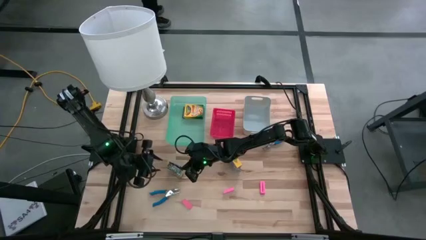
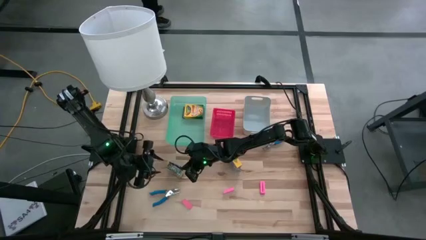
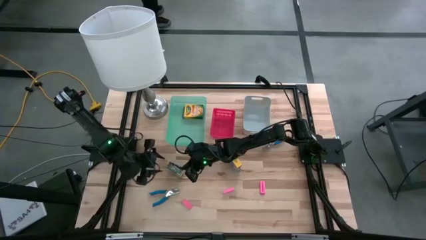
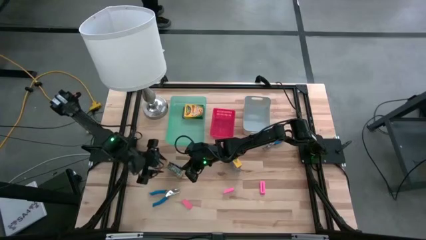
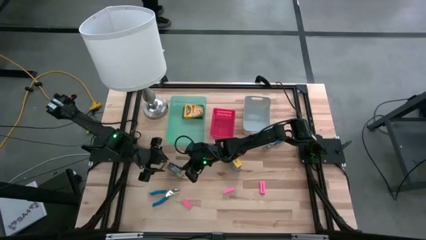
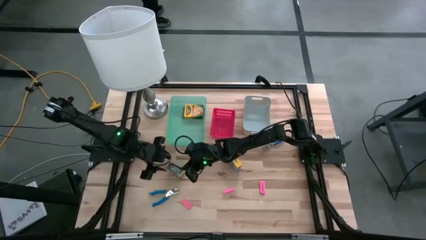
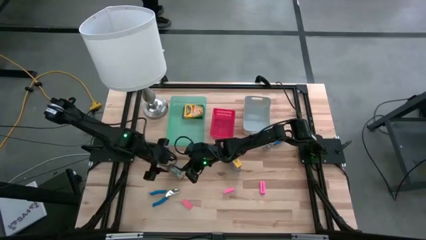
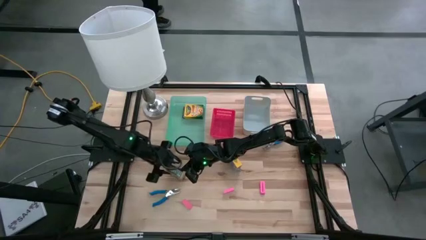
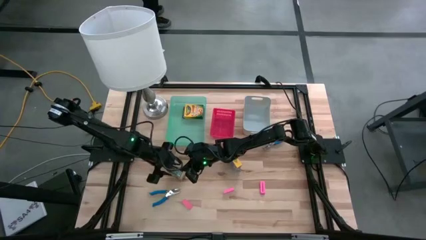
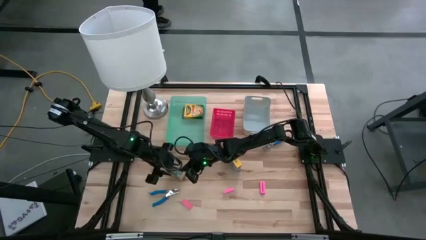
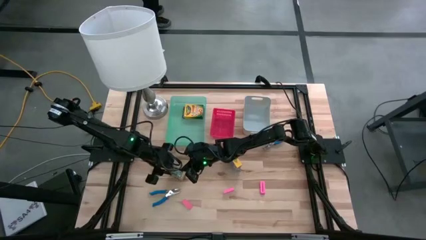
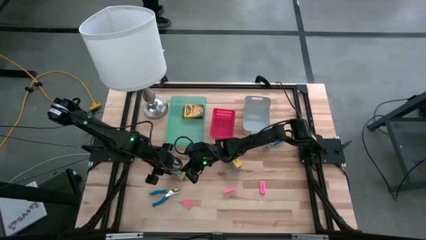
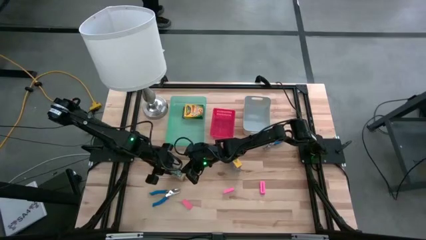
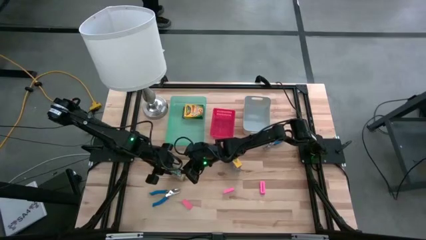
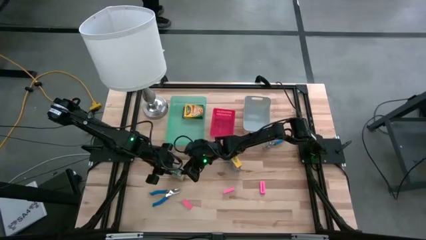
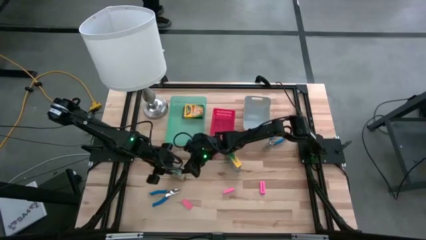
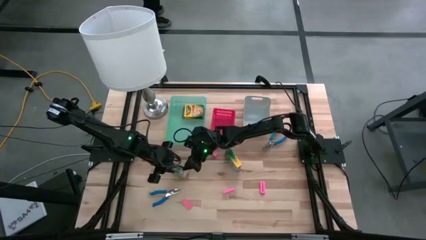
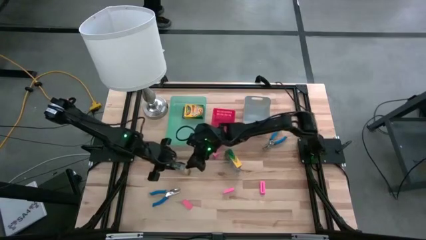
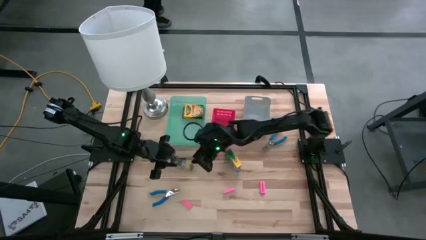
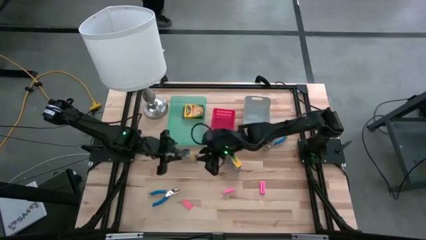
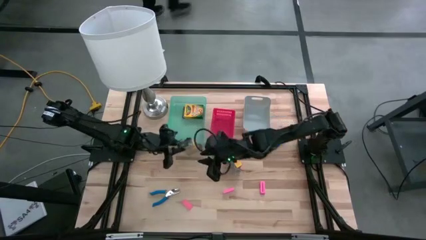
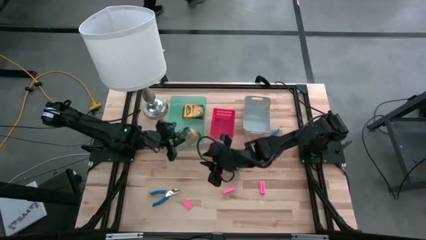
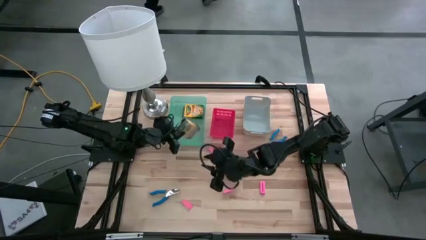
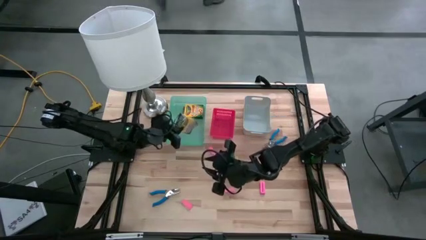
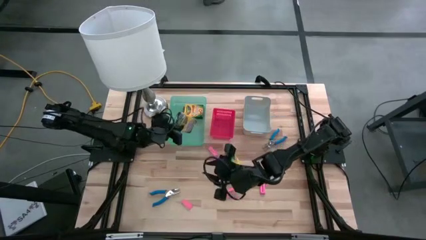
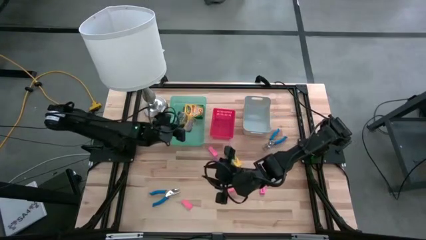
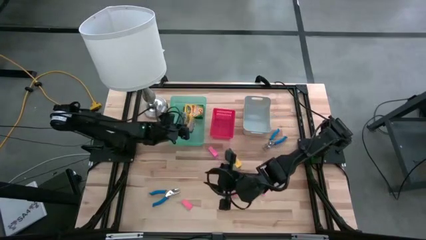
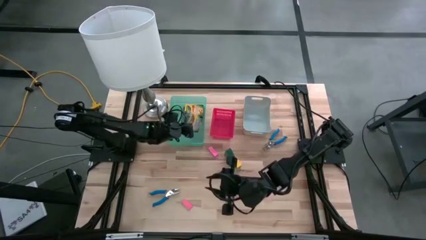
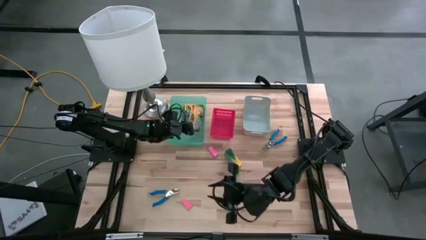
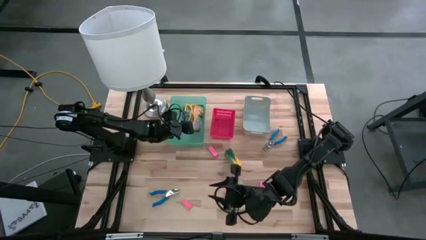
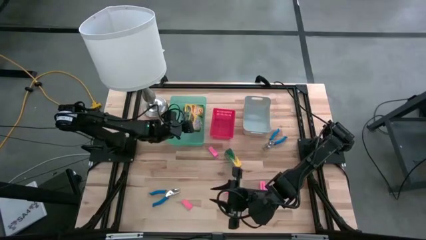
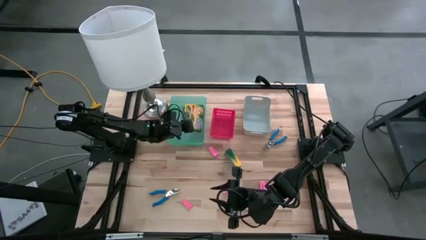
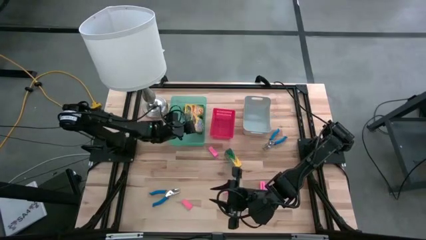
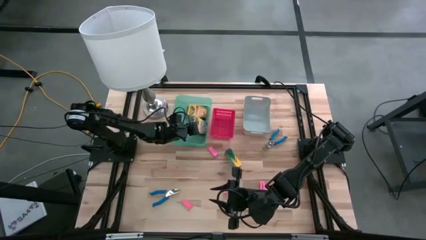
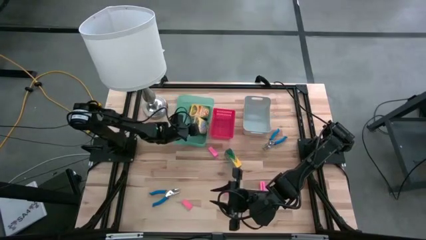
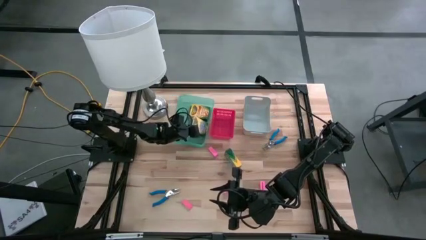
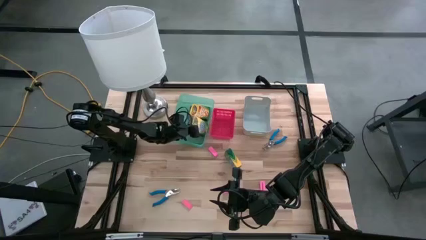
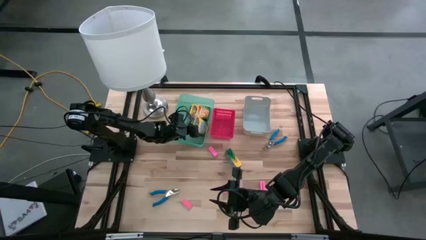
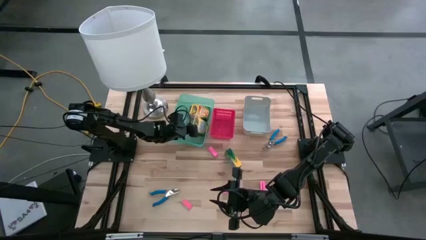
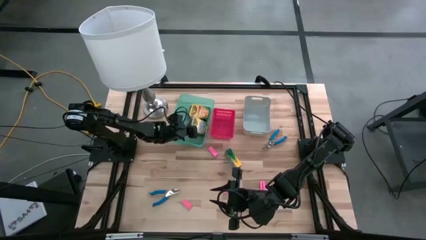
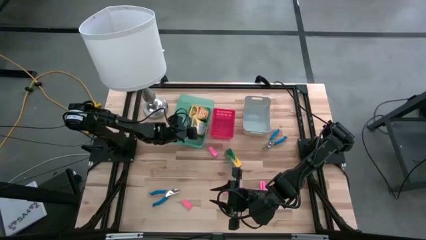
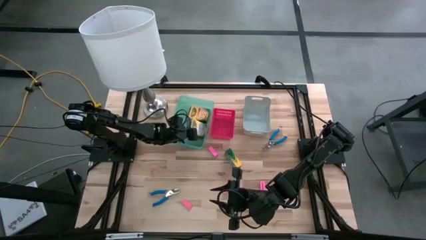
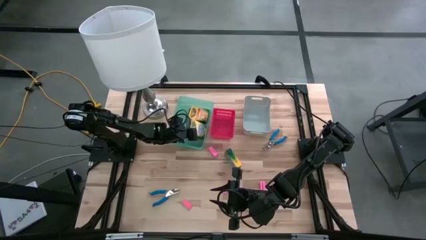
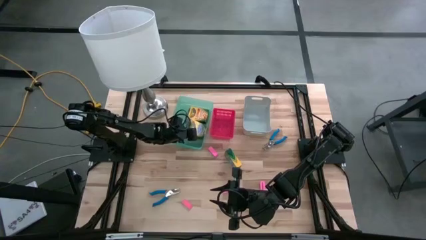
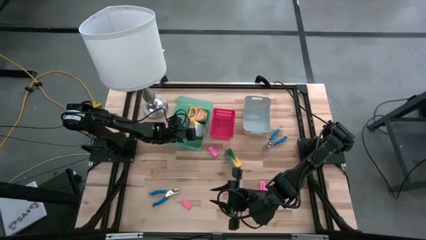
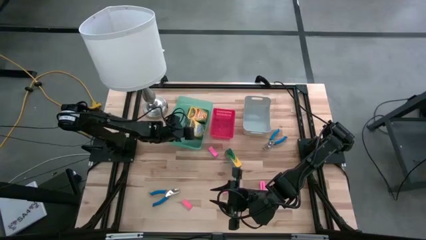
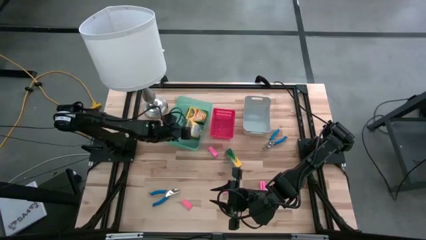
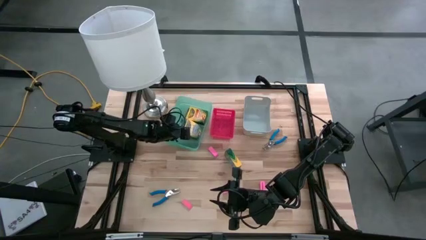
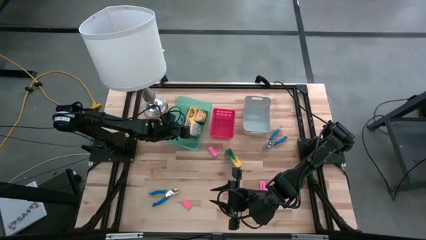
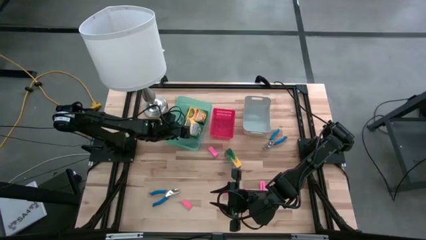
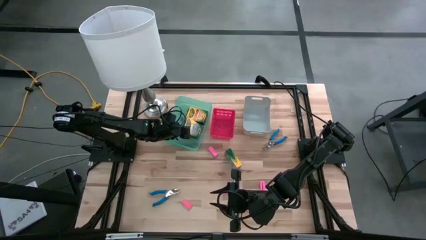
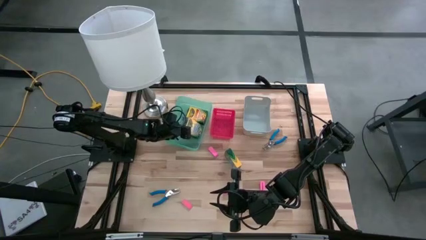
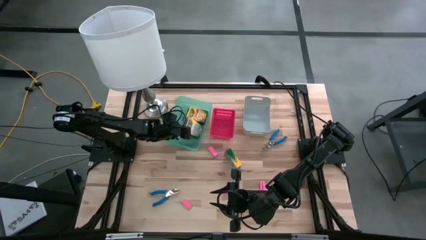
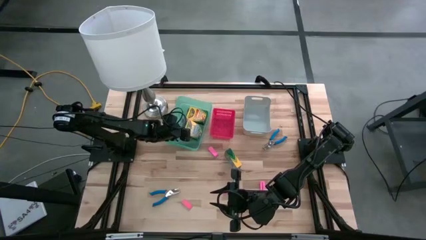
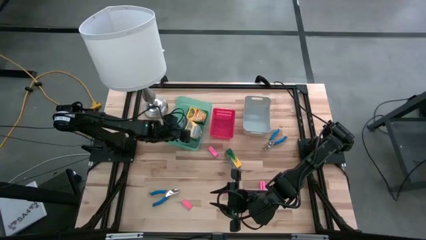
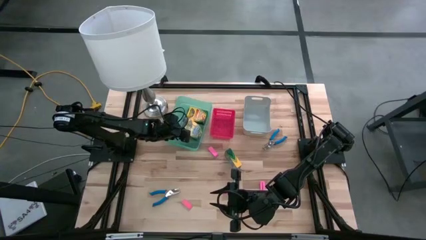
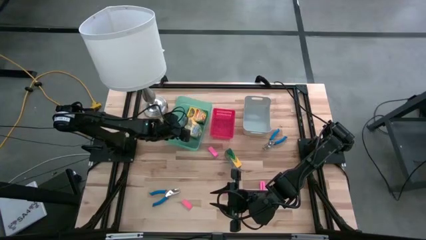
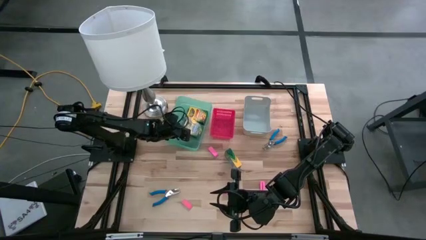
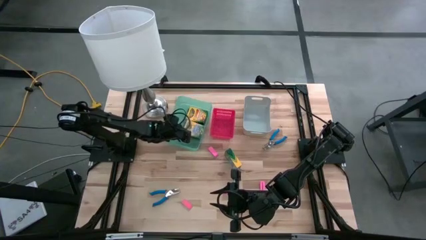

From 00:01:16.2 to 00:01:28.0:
Task: Pick & Place School Supplies
Put the yellow crayon box into the green bin
